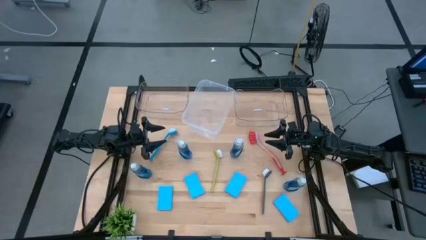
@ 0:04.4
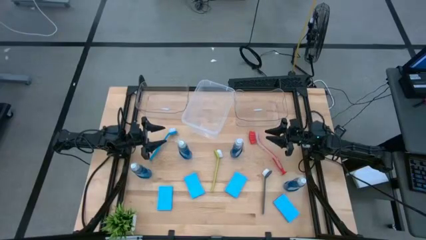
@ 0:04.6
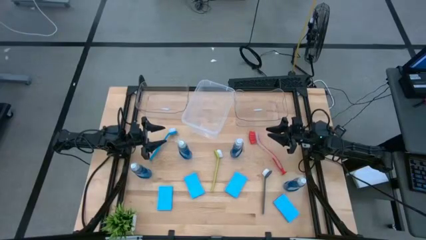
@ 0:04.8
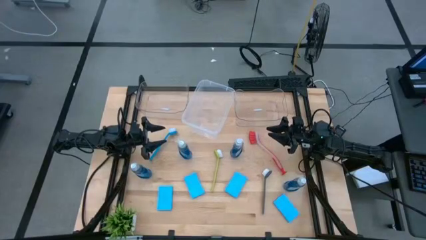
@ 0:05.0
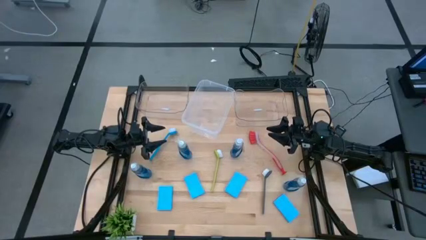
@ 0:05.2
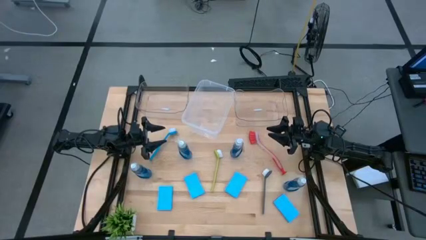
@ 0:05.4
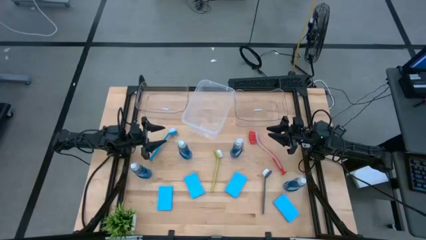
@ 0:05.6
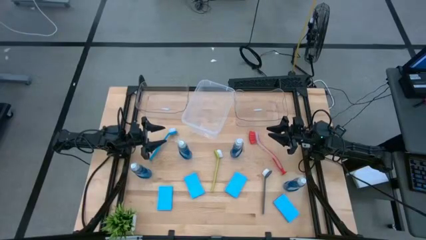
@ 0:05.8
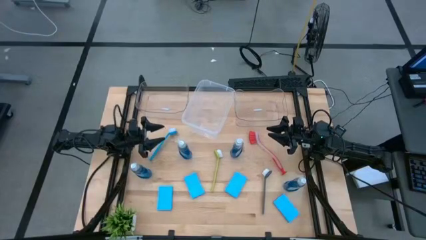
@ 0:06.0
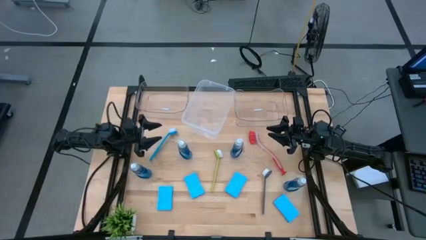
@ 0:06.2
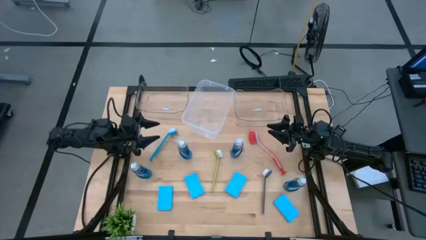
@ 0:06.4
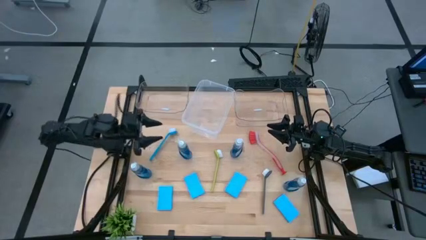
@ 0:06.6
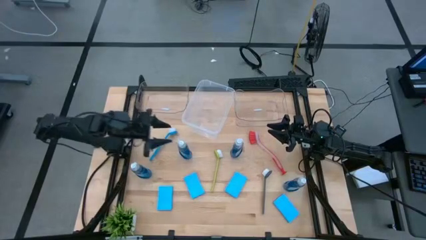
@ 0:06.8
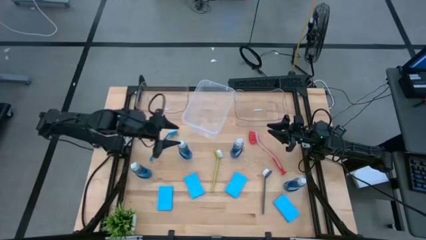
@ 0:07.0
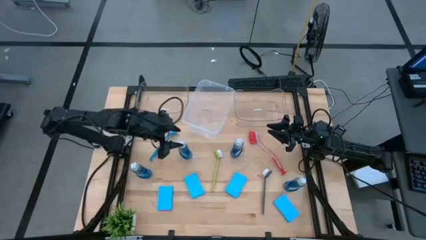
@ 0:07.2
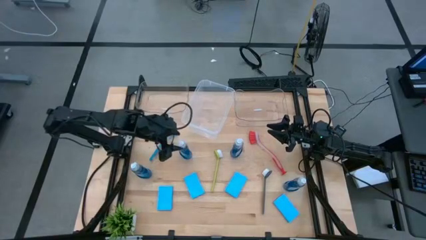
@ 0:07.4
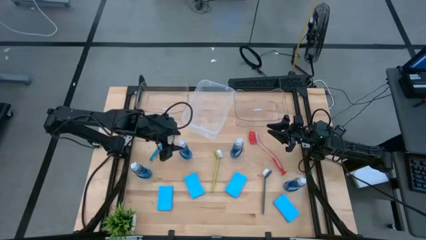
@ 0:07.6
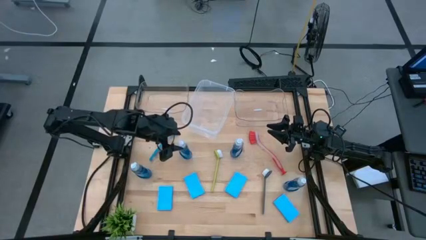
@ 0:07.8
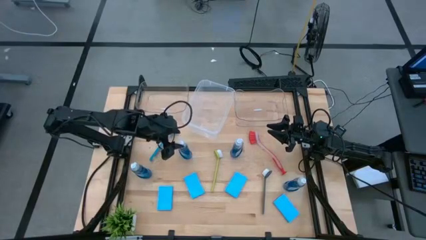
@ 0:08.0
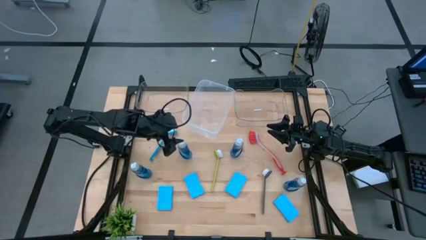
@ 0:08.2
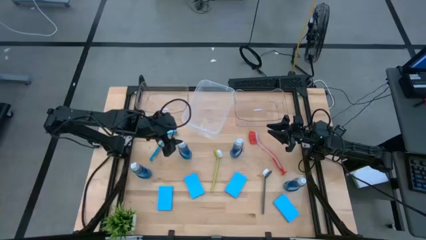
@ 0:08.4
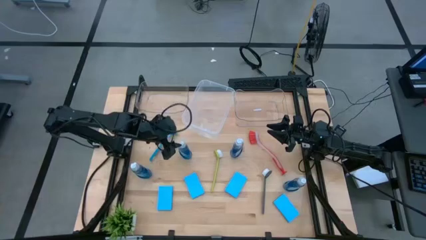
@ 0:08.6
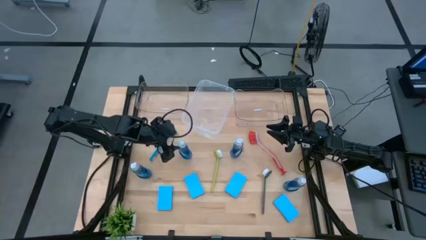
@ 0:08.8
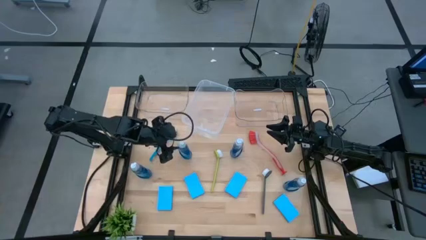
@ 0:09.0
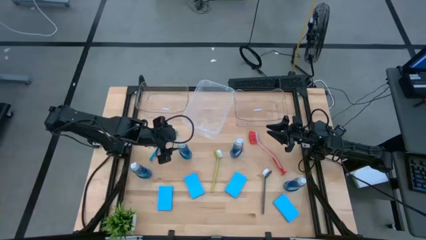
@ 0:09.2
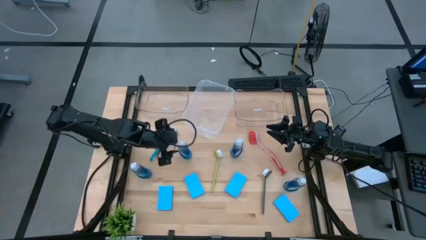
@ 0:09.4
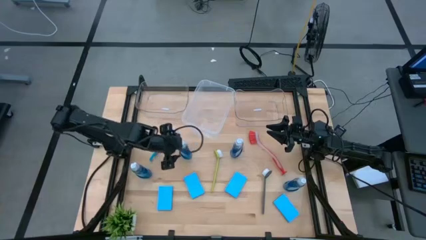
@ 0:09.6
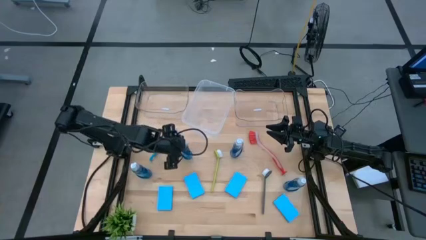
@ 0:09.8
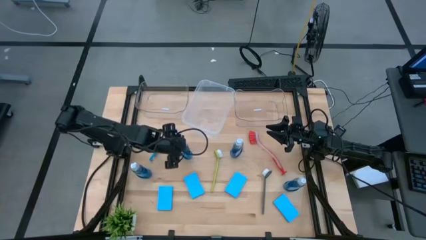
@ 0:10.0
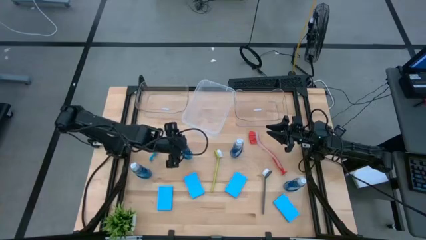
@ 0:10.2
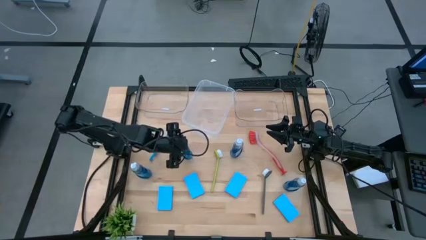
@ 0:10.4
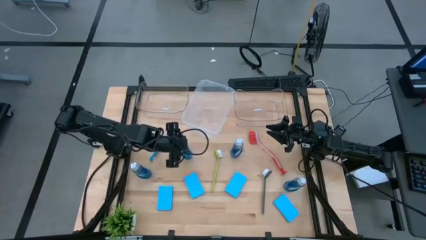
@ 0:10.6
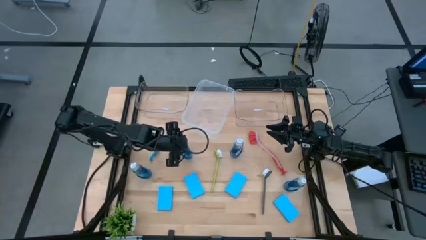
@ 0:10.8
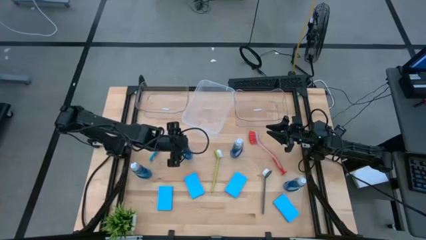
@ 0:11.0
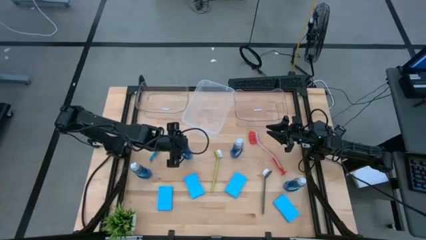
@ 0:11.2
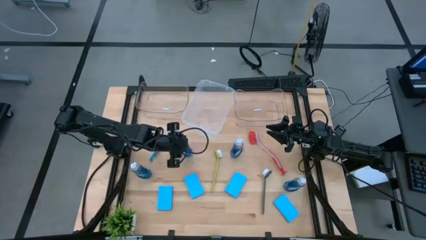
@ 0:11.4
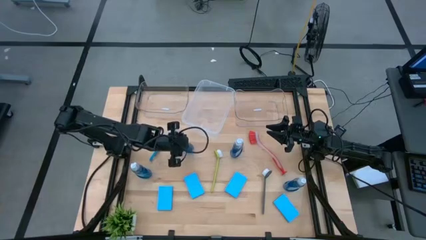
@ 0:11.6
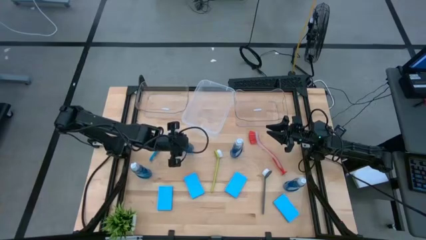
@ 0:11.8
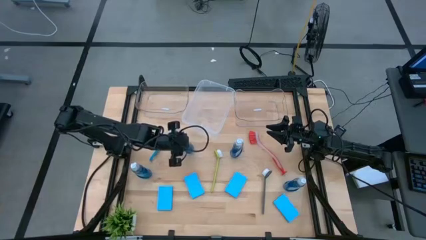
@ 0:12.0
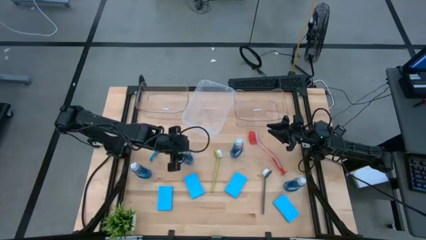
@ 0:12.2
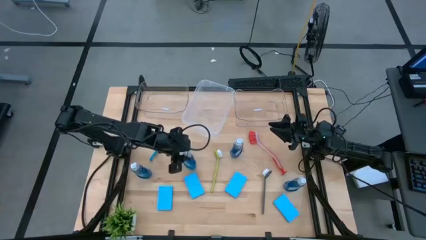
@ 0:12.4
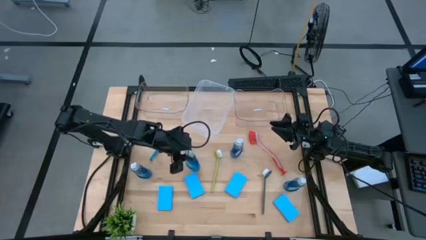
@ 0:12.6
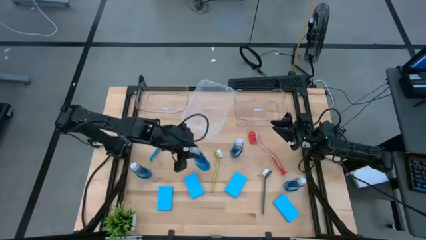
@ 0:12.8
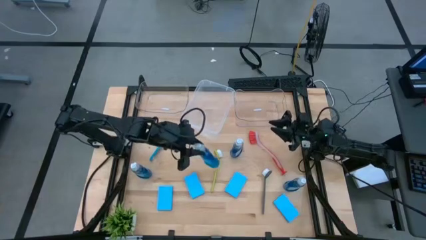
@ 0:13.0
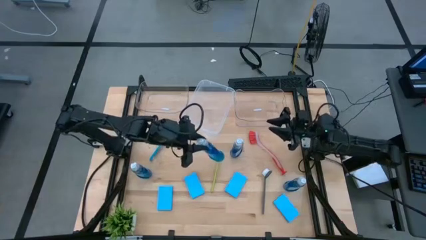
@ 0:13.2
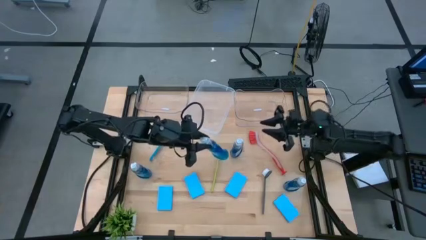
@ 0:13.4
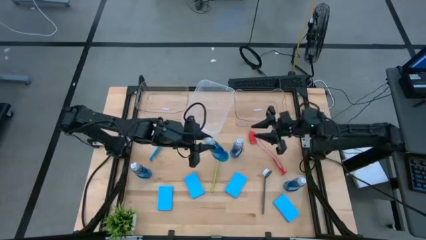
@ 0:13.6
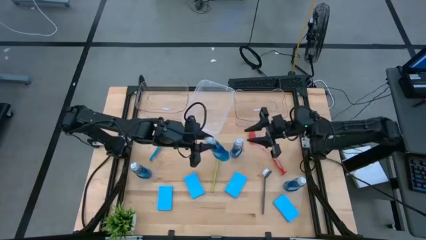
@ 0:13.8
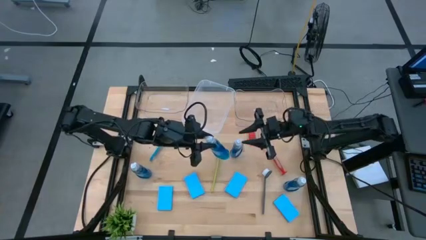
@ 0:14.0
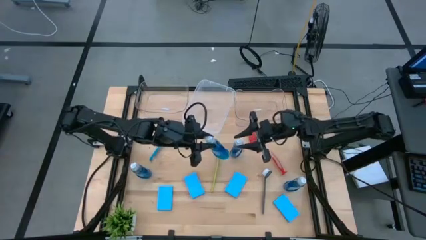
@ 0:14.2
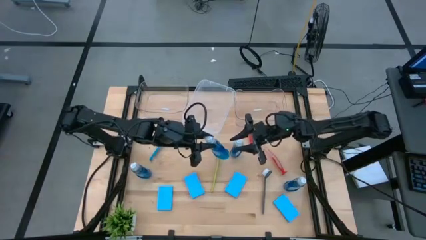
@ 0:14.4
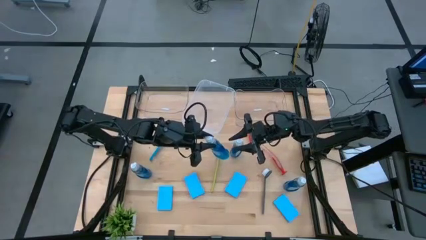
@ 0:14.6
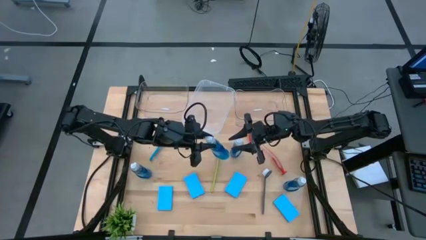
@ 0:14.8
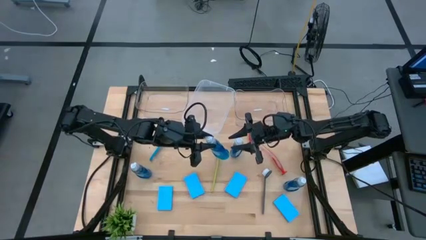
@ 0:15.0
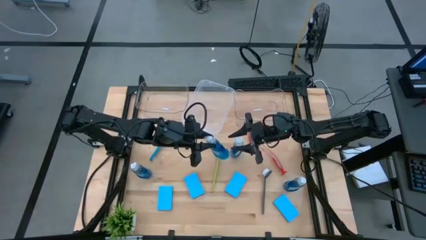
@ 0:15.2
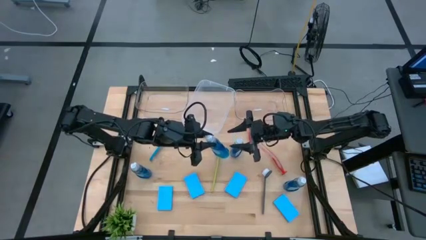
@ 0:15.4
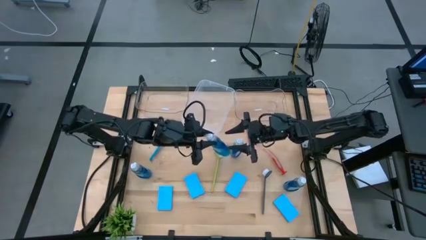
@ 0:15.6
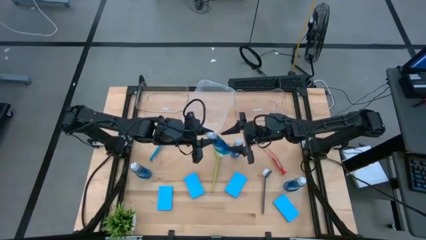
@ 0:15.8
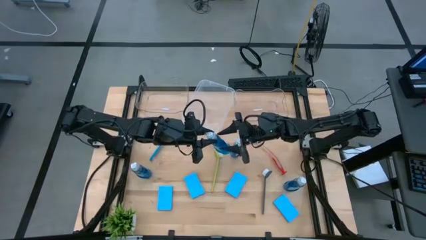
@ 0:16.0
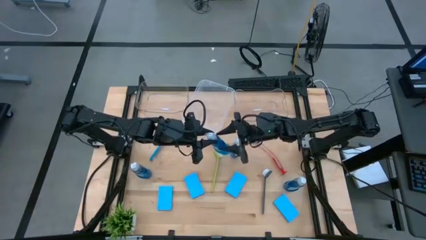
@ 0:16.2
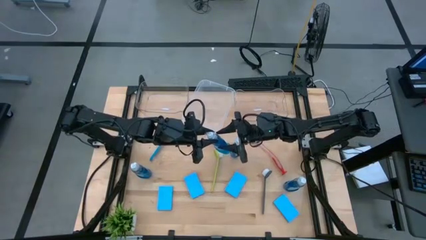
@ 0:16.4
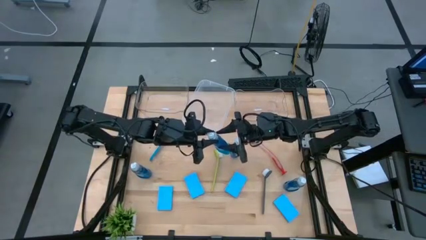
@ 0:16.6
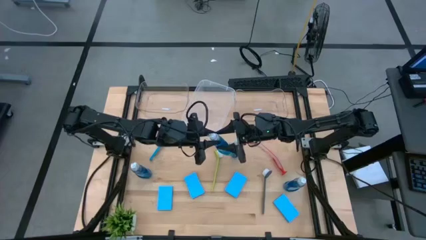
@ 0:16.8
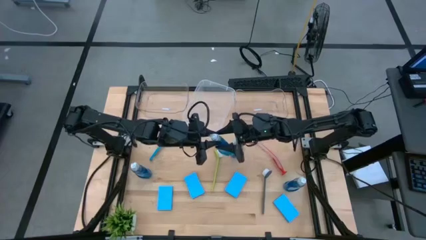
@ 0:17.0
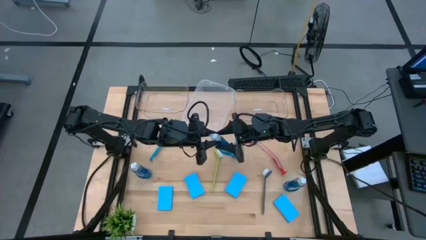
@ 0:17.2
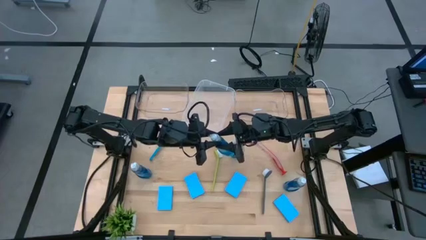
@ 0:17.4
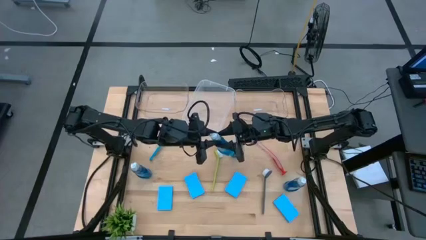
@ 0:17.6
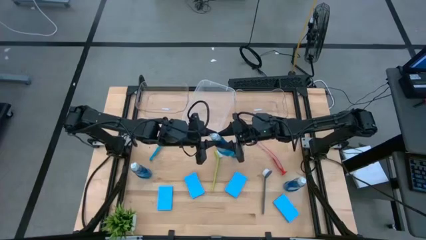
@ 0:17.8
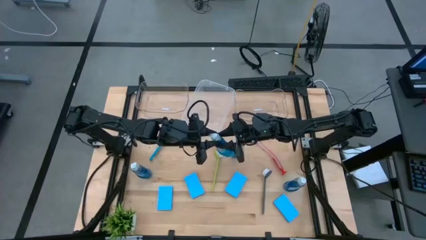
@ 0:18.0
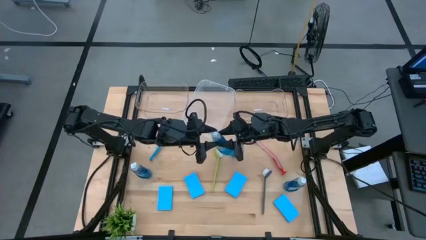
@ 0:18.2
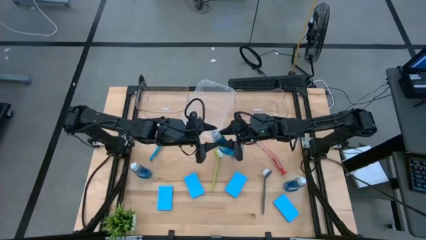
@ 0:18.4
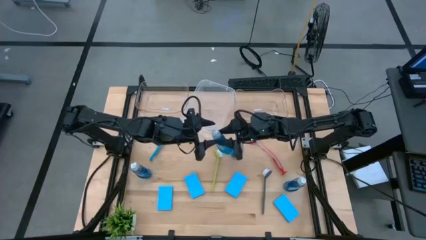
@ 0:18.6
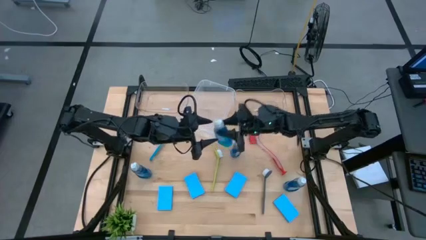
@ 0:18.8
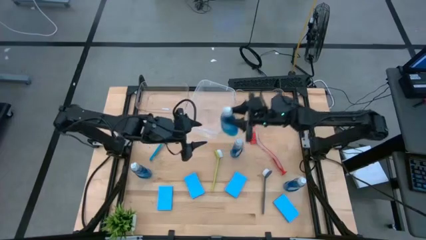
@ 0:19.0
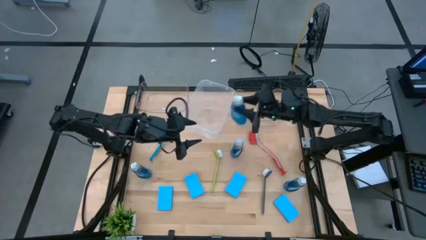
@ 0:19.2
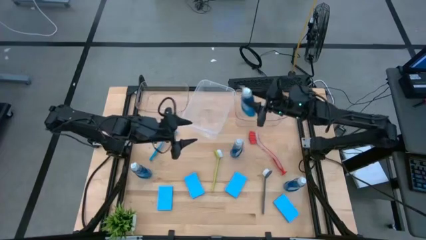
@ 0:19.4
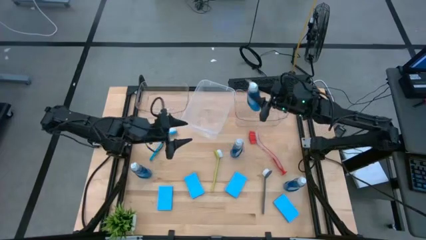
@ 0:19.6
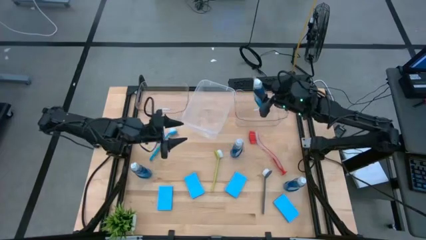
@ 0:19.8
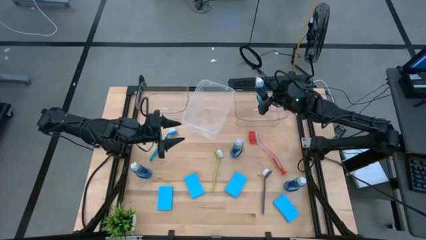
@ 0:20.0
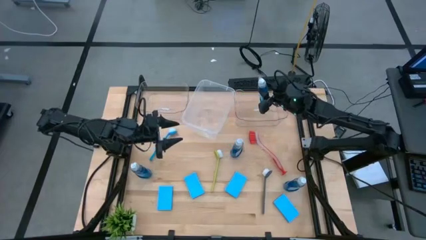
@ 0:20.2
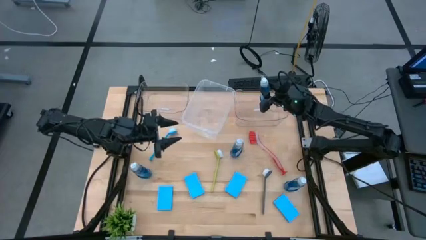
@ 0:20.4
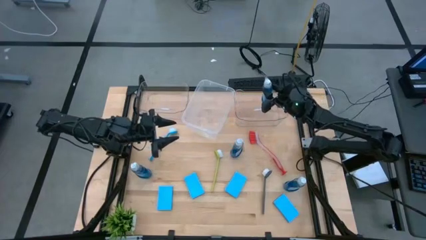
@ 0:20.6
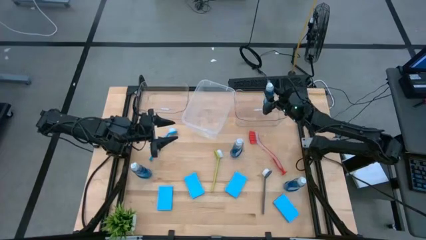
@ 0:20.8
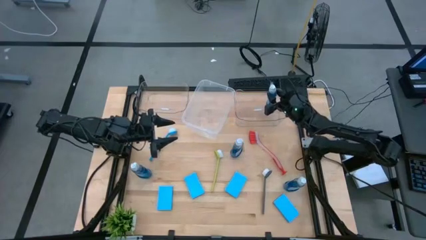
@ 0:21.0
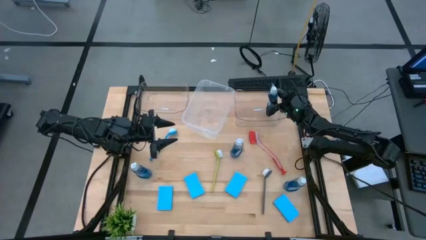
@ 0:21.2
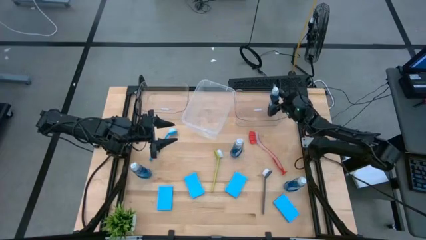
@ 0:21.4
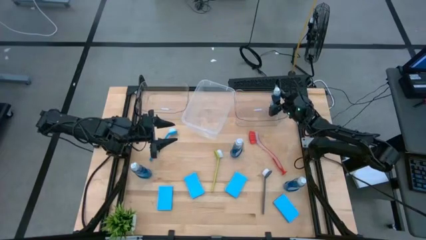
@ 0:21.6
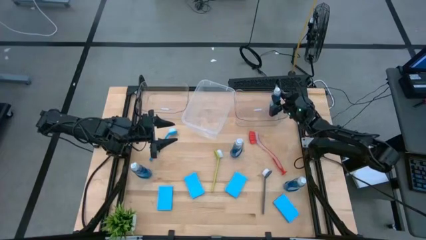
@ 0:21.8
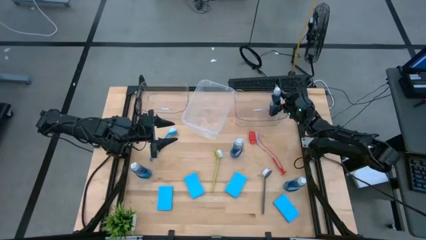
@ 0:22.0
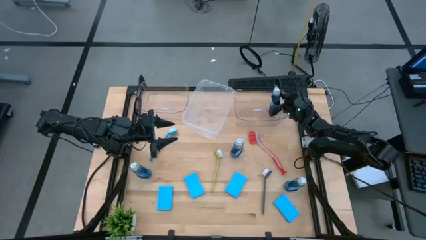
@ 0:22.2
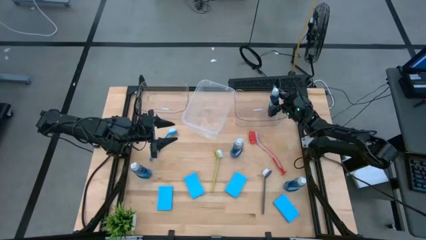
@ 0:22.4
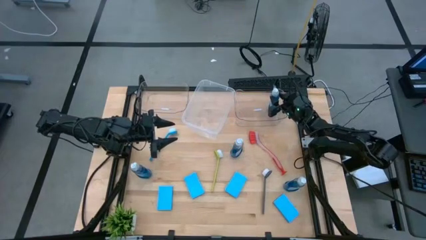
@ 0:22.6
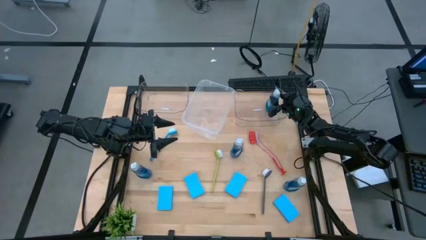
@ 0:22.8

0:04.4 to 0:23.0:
Task: Pick & Place Kitchen Sink Supplies
Put the blue soap dispenser into the right transparent bin
